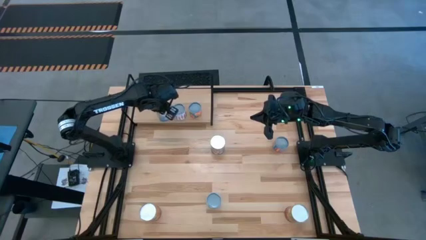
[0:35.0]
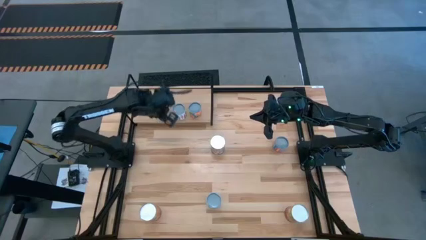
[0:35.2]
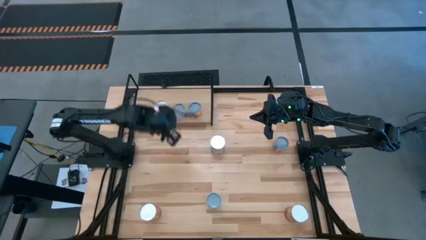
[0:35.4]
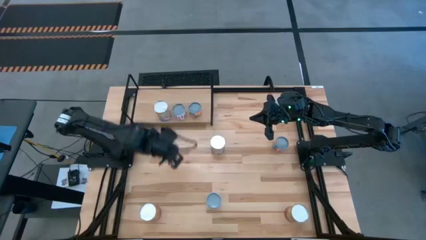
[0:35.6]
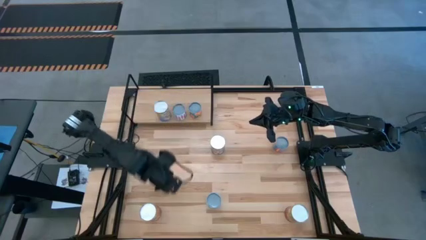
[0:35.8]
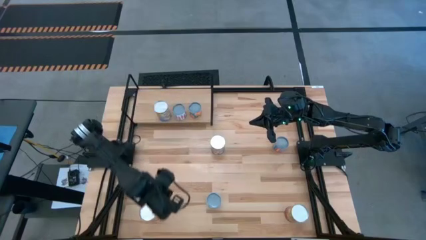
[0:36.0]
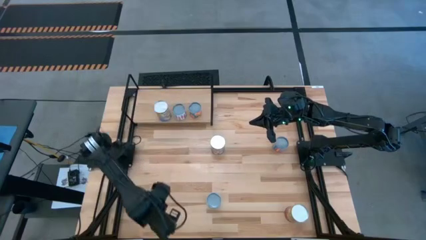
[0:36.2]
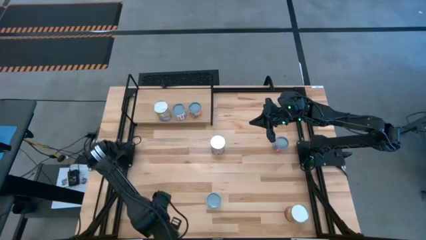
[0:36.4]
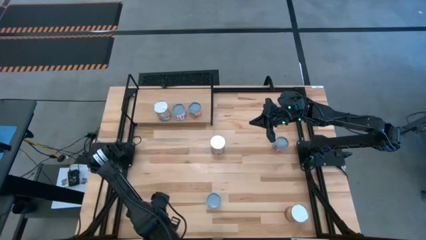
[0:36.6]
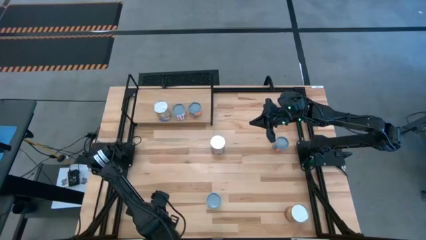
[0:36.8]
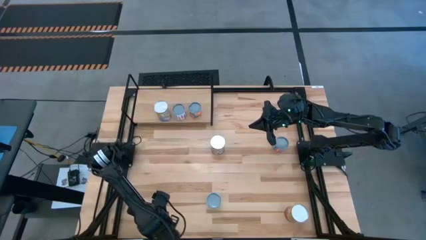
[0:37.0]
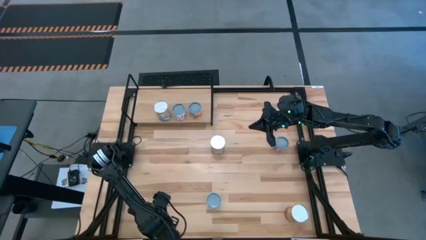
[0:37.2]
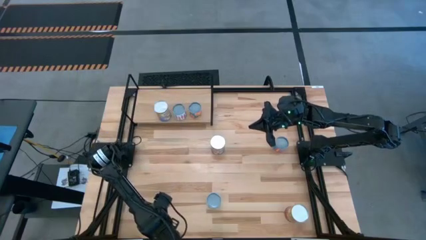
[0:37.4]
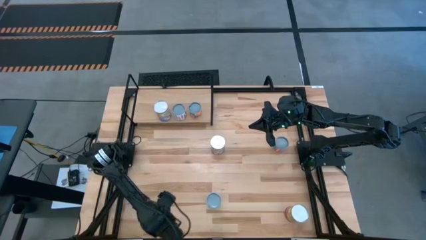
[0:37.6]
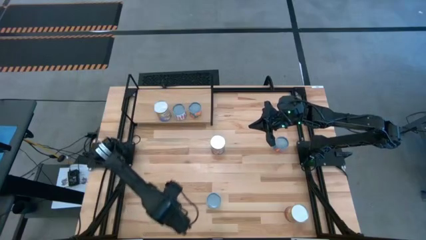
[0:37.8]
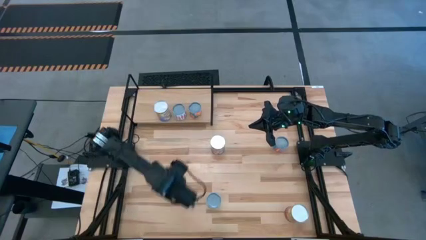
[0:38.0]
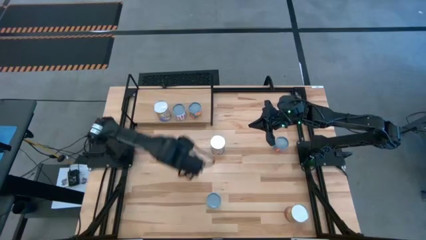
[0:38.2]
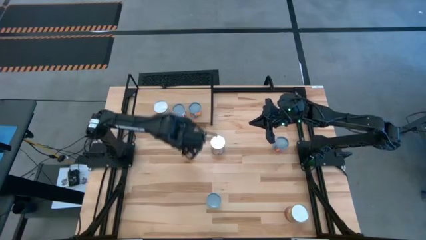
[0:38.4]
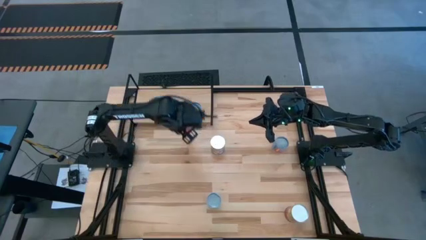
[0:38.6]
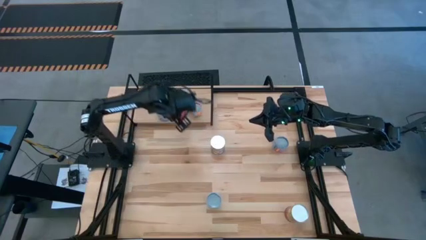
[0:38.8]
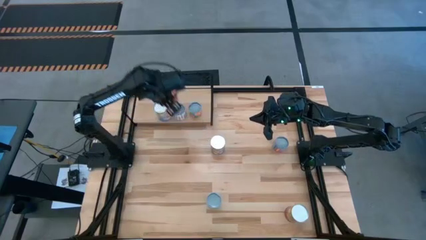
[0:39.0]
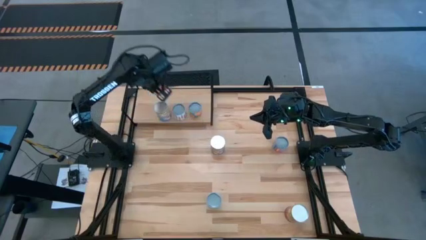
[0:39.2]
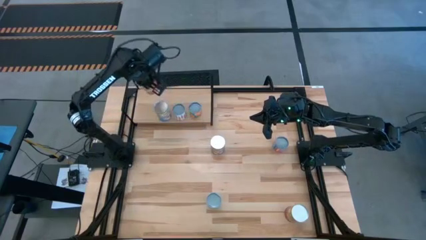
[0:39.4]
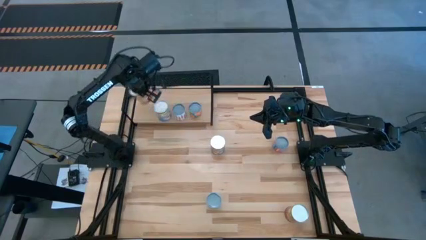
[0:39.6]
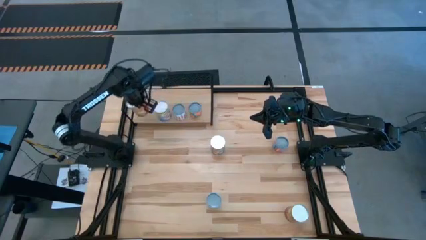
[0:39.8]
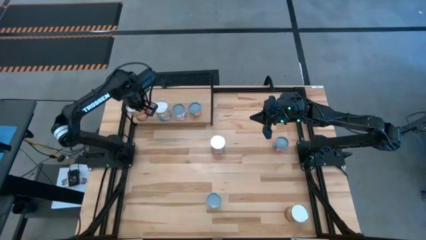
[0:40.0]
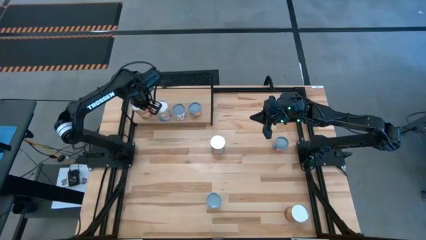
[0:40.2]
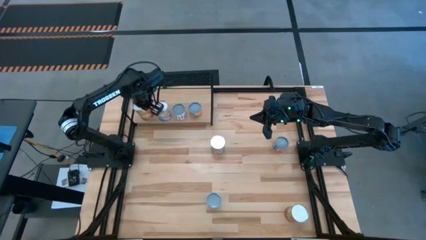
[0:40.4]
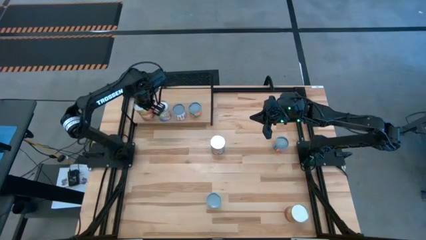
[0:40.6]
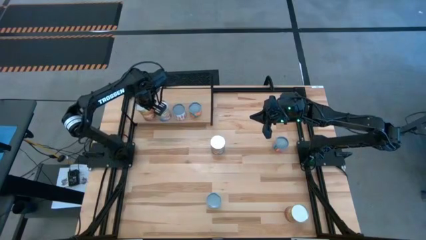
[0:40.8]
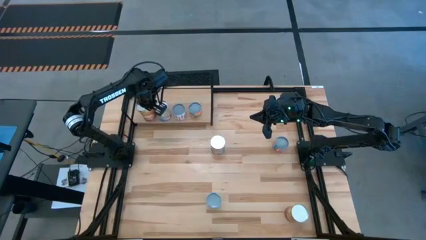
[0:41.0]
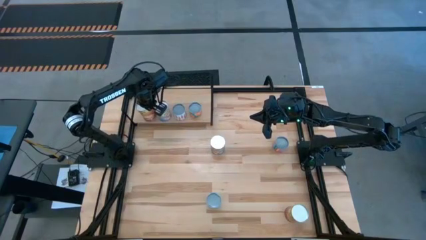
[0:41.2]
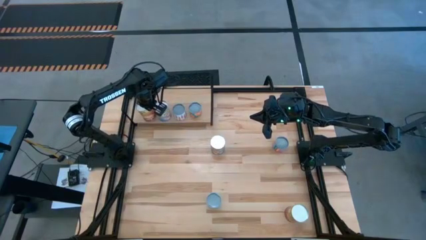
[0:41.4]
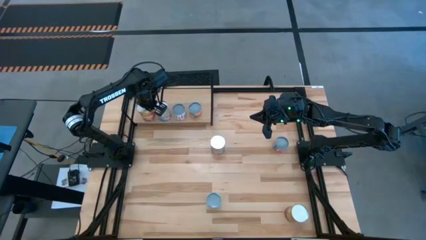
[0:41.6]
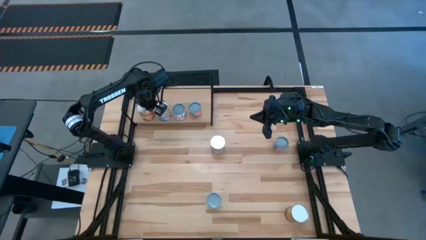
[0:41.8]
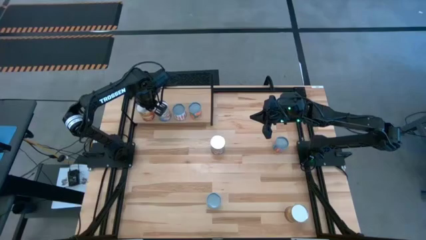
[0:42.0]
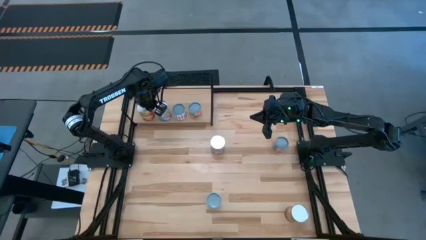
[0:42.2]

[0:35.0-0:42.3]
Task: Pick and place cans onto a shelf
Put the left large canned corn on the shelf

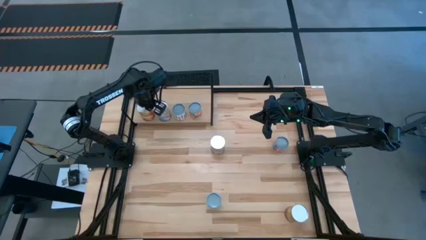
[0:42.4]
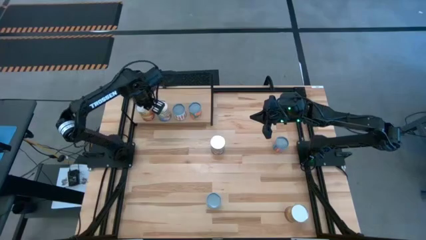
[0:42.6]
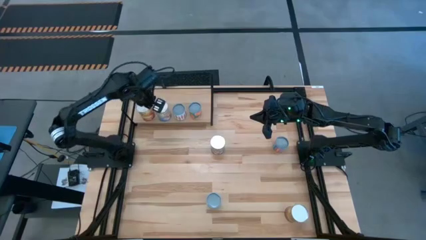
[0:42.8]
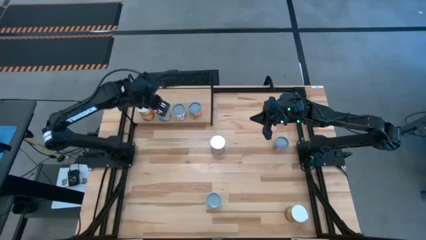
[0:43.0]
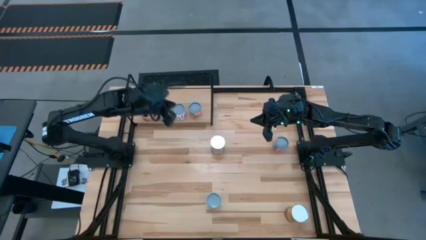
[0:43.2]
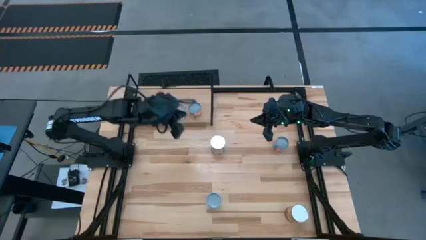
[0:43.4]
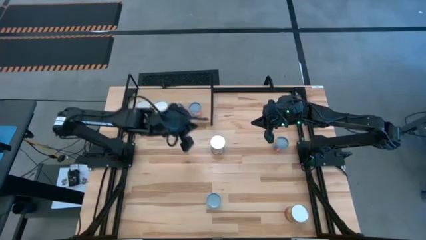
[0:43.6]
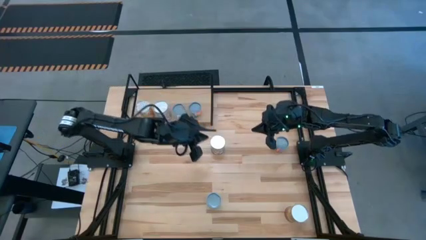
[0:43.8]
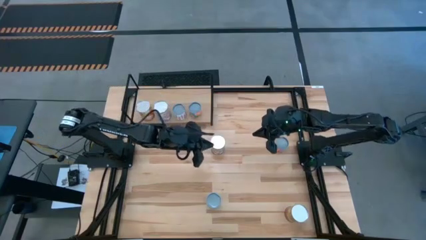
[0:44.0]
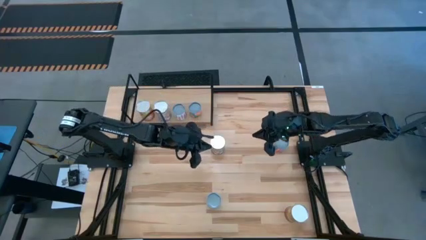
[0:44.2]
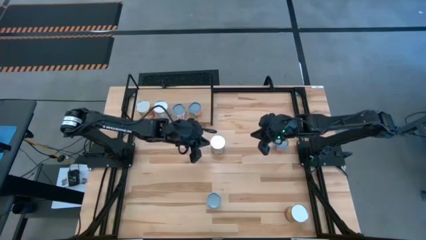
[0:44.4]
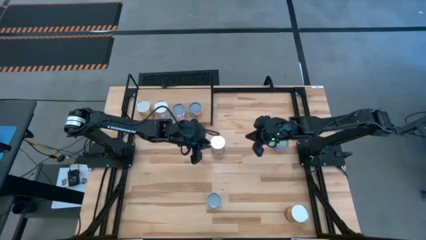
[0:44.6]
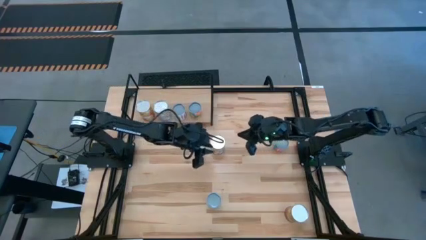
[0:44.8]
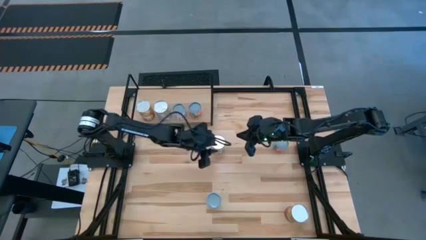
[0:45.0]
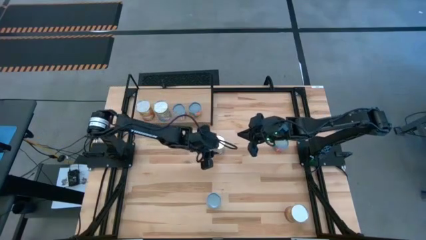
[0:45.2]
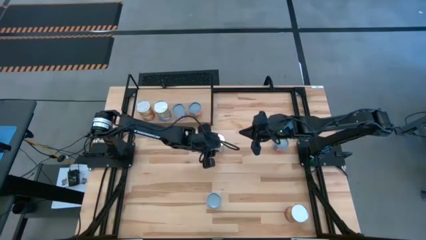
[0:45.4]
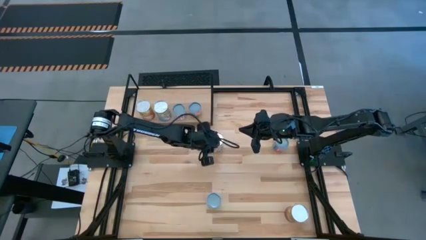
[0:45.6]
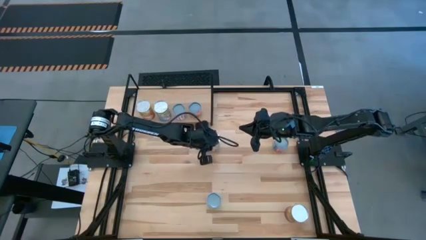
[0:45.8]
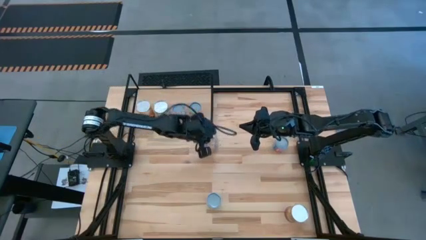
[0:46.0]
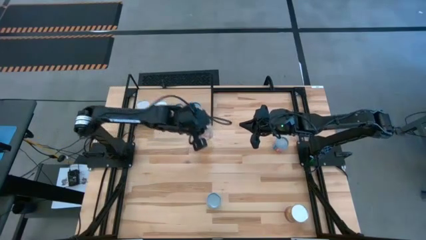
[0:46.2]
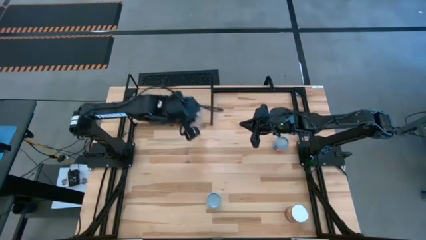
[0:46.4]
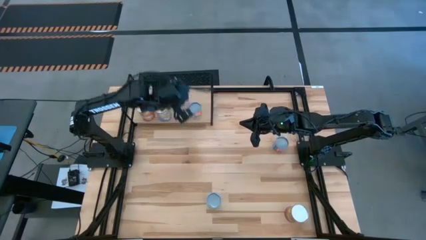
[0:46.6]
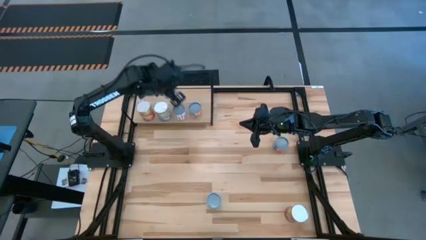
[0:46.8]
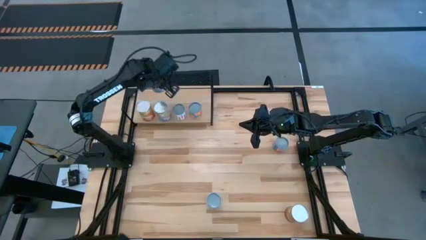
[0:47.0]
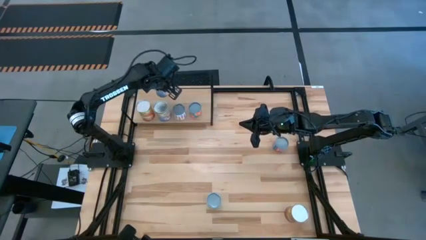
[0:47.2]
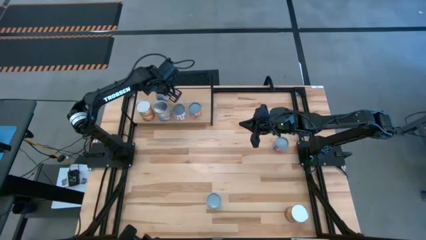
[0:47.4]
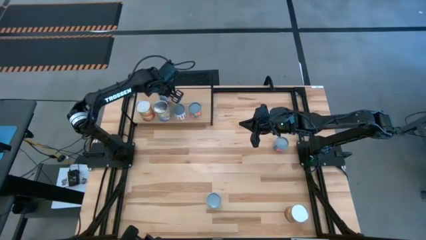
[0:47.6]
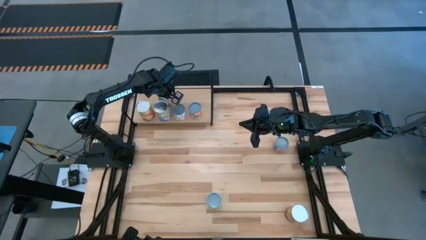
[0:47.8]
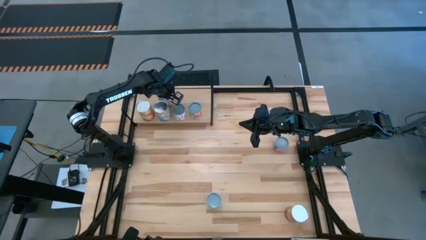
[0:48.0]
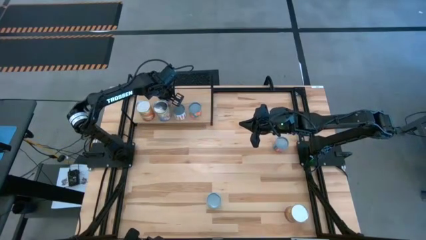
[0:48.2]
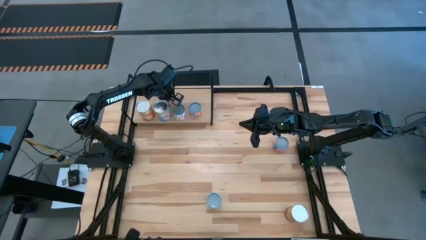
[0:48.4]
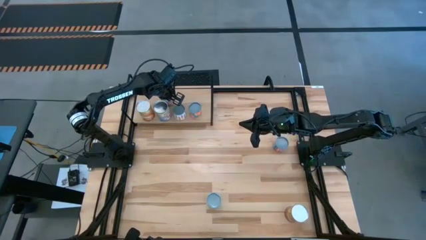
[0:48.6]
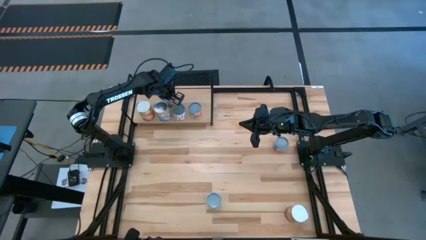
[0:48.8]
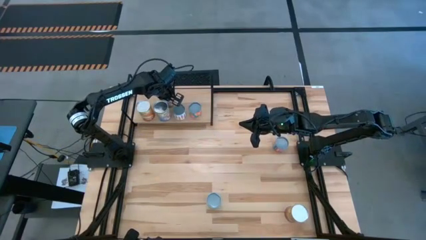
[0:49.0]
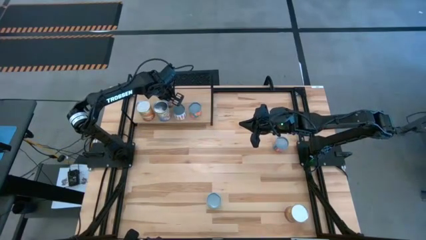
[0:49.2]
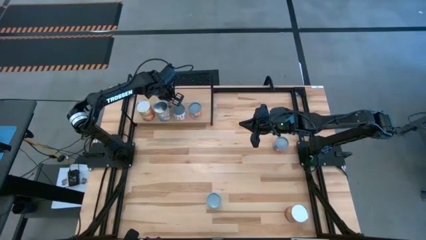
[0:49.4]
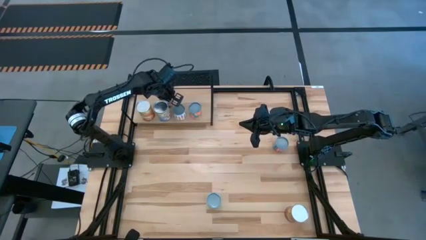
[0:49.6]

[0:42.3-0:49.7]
Put the large canned peaches on the shelf

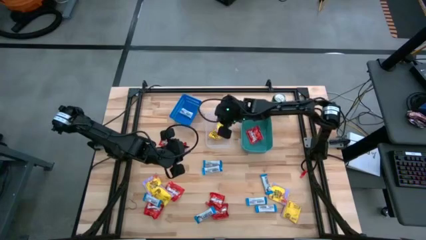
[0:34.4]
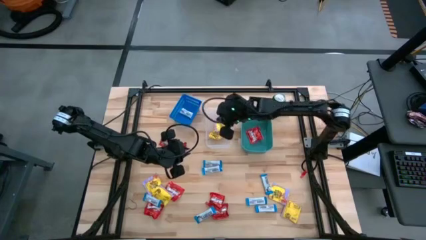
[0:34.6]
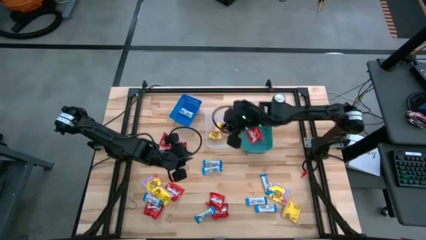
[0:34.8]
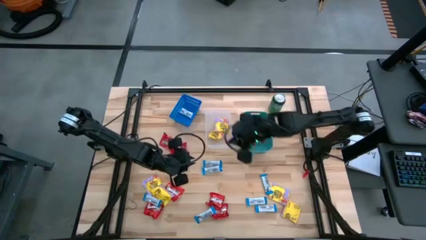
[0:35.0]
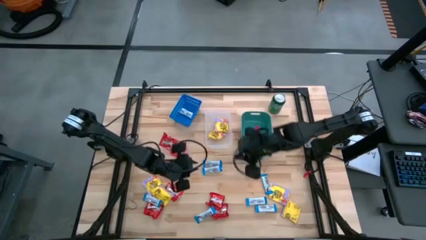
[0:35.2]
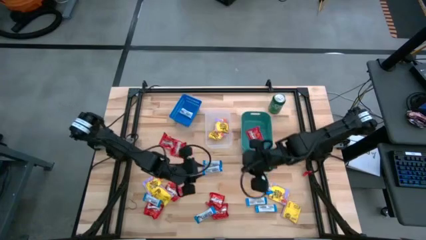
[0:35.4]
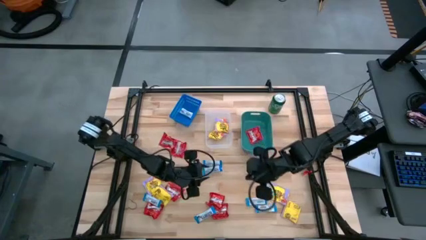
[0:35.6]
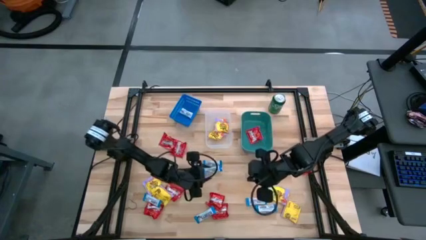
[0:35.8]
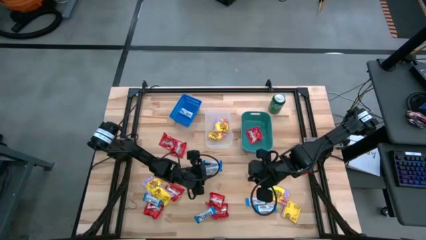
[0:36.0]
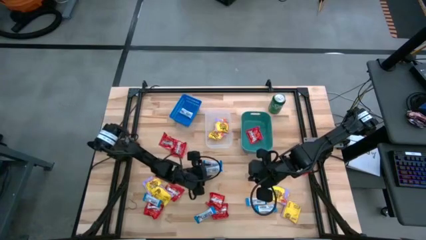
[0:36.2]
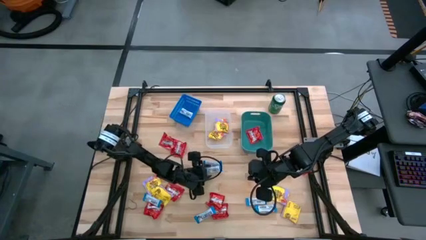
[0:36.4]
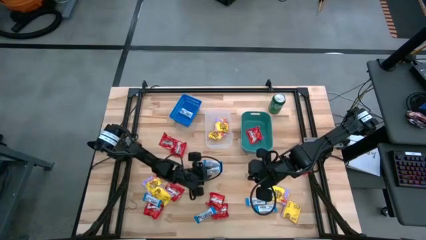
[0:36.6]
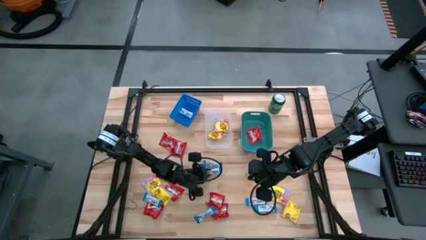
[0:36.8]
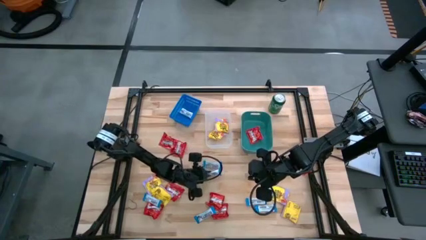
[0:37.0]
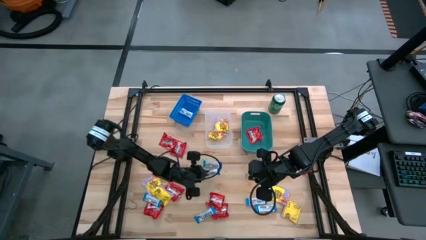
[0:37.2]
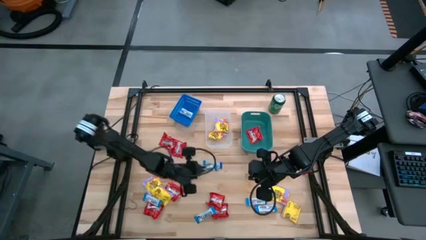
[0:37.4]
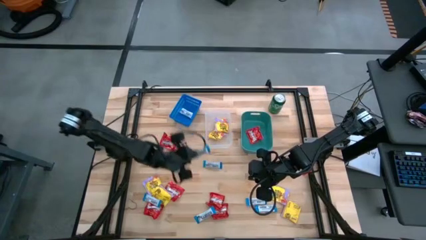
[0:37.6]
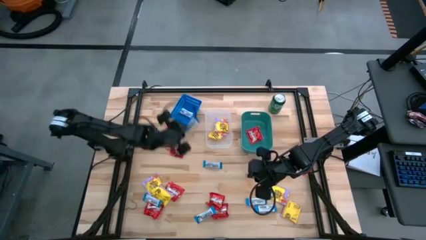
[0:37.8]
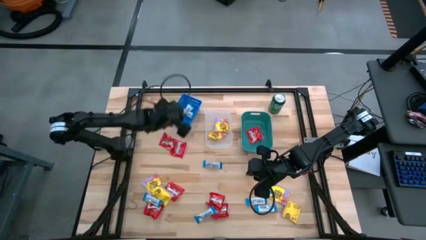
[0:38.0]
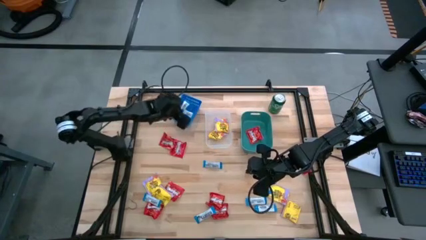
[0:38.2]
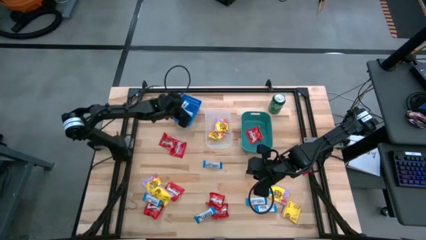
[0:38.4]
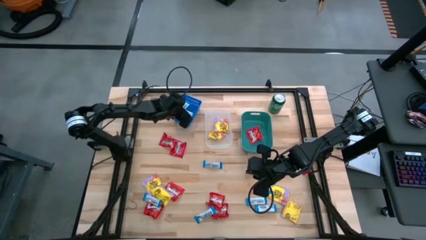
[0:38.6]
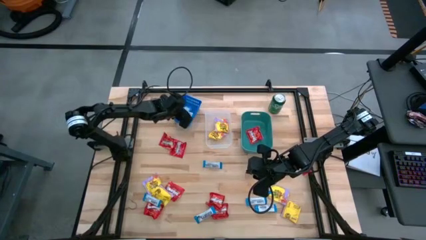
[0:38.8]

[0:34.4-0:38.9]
Task: Sort candy
Put the white chocolate bar into the blue bin
